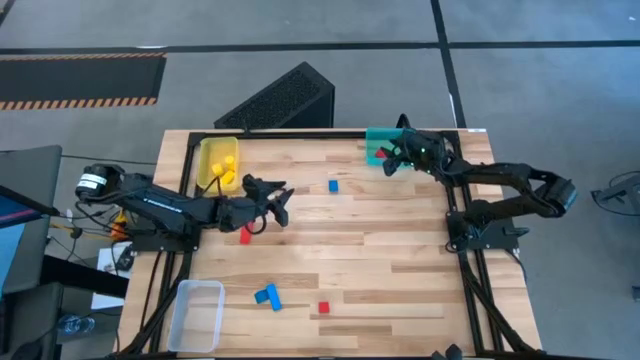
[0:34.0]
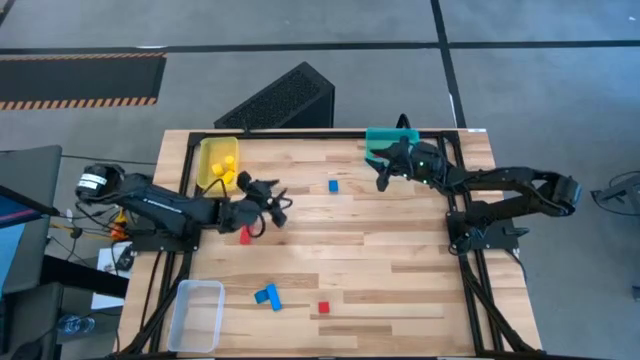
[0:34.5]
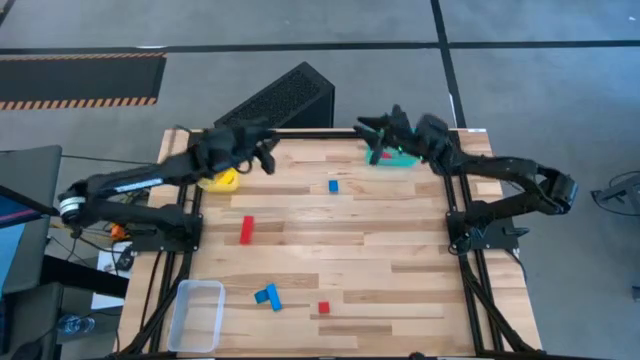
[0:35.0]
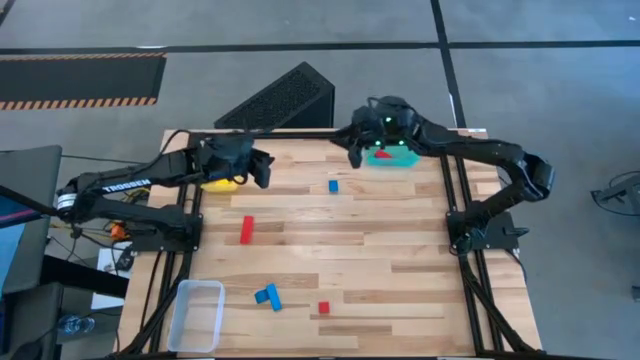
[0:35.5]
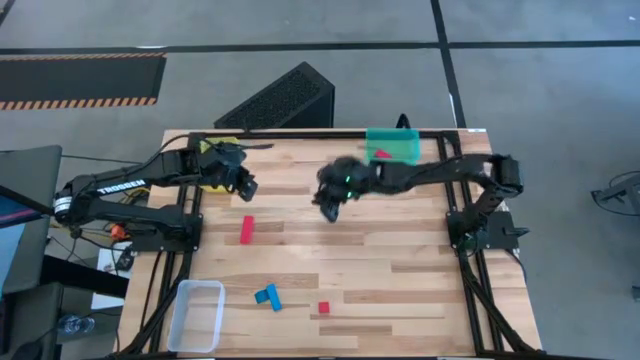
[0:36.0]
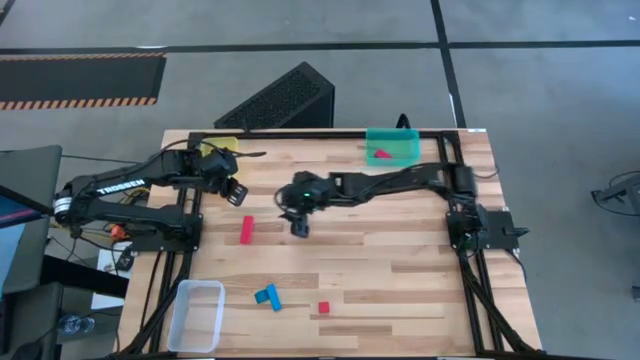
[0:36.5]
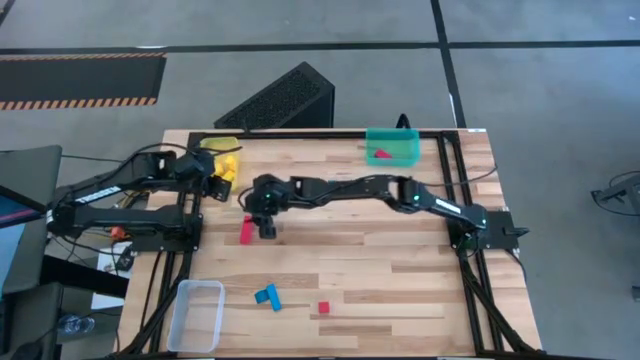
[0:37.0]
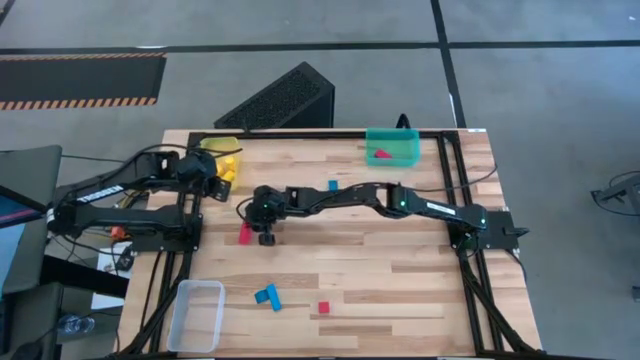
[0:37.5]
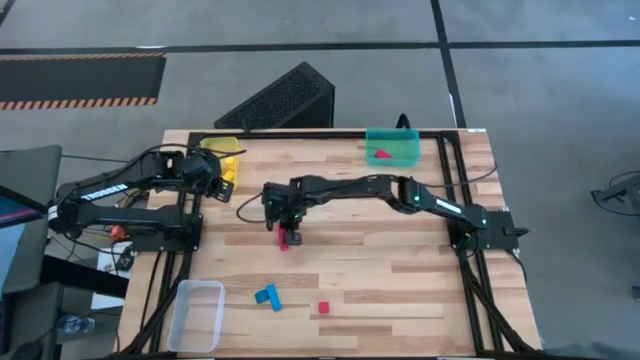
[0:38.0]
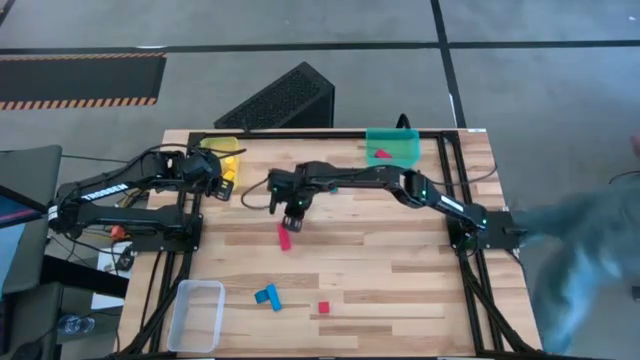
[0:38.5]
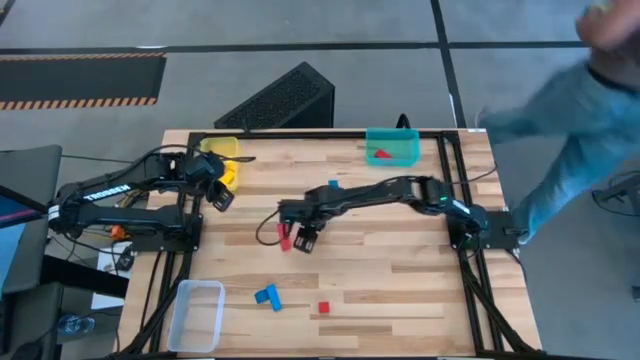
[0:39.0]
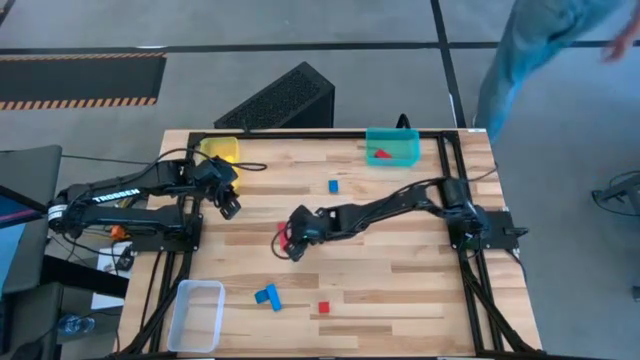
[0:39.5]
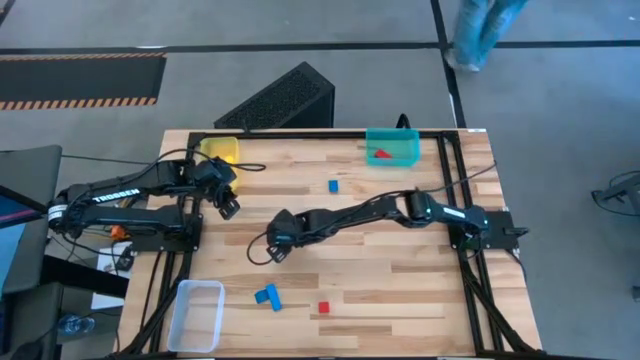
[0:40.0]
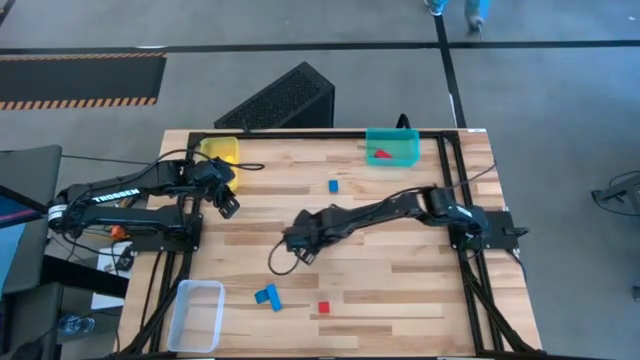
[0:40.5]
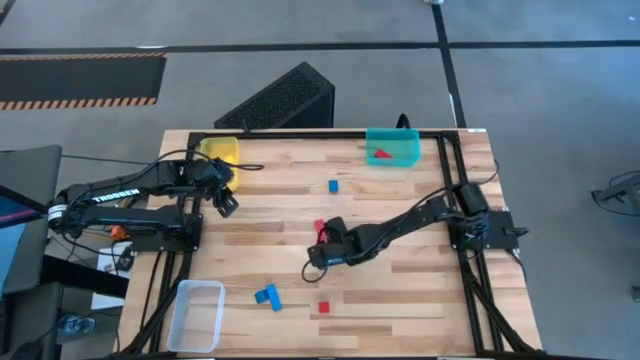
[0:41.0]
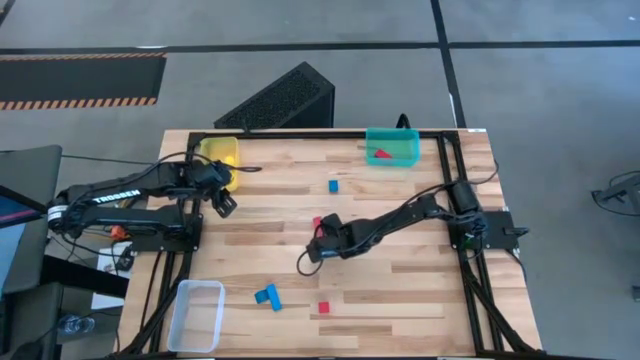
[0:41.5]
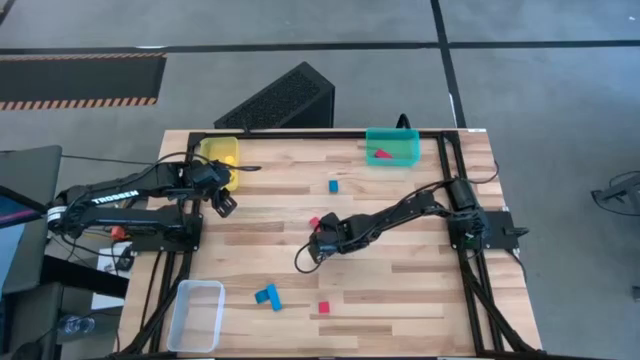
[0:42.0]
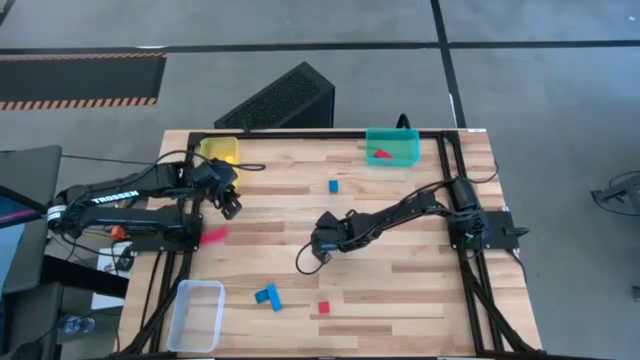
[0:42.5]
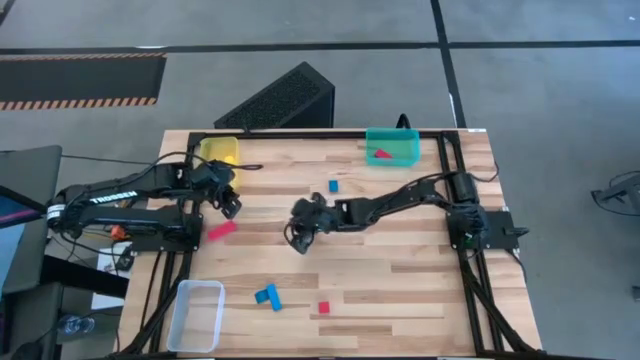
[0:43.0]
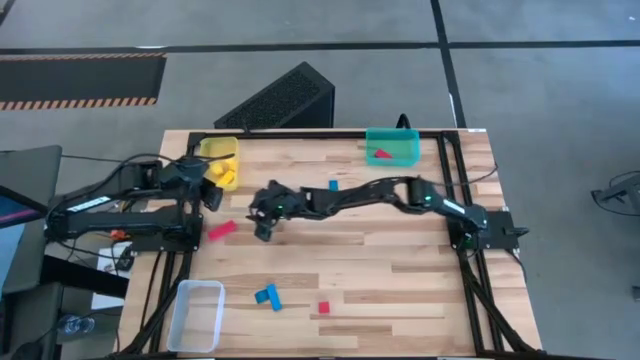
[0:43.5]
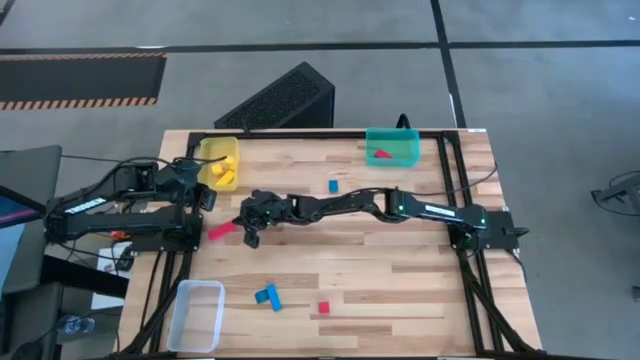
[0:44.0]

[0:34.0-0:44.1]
Task: Sort & place blocks by color
Put the top red block into the blue bin

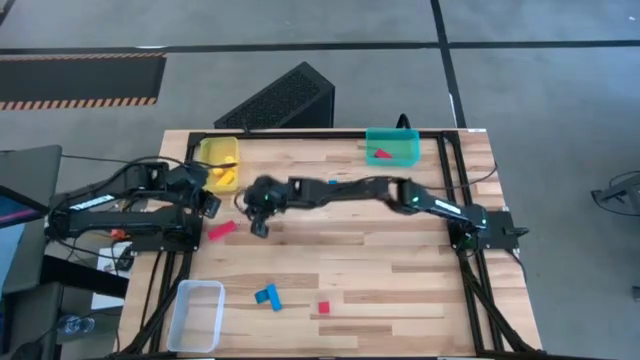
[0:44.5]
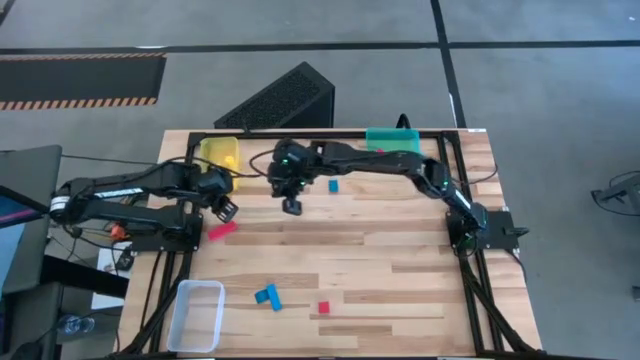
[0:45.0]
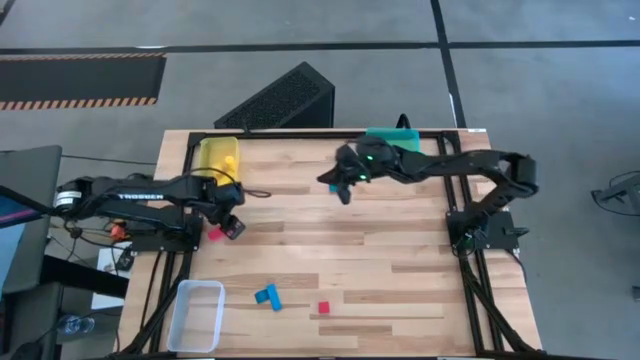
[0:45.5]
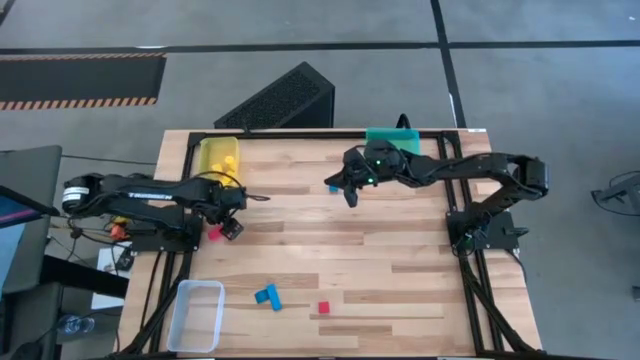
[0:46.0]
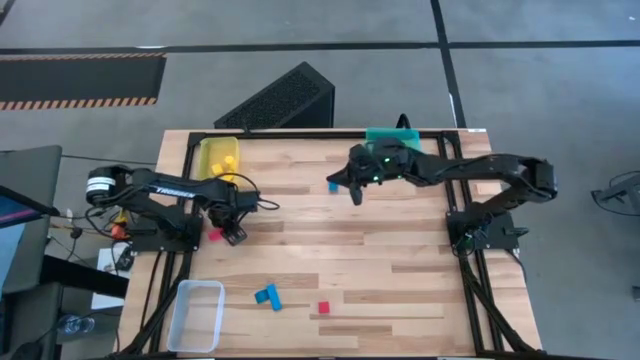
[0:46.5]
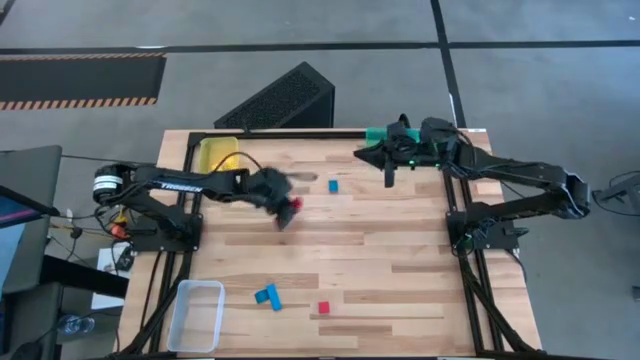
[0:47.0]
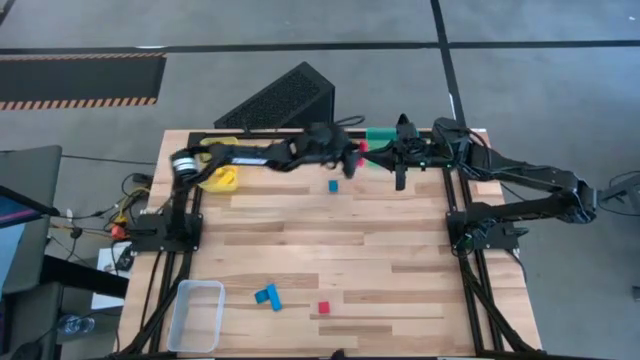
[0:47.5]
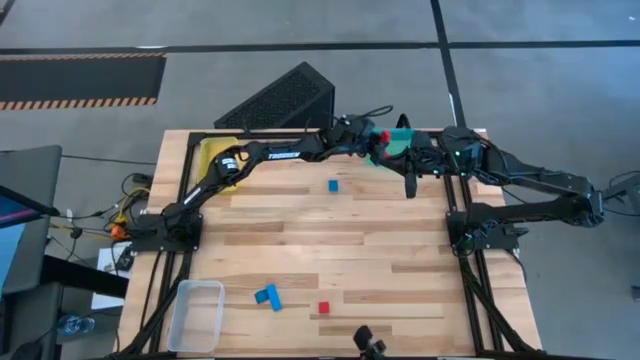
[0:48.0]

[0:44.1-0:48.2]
Put the top red block into the blue bin

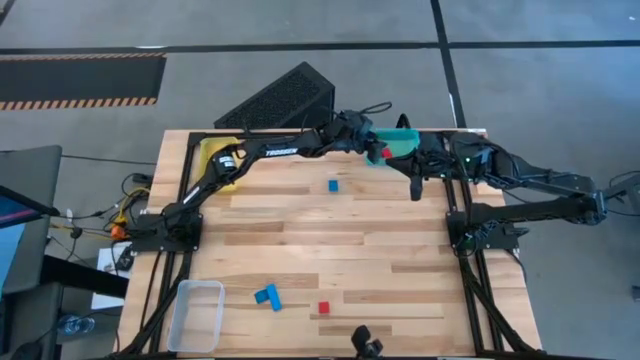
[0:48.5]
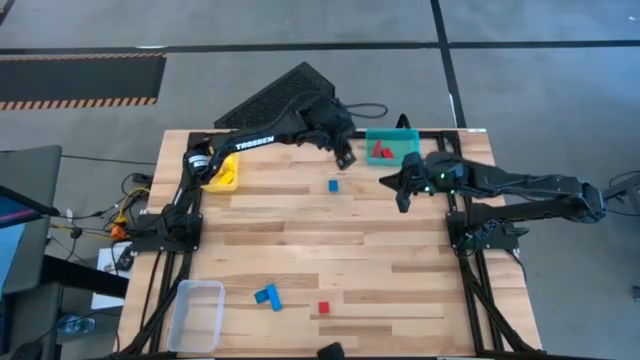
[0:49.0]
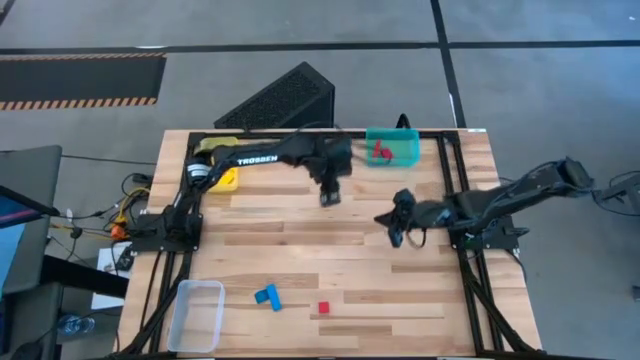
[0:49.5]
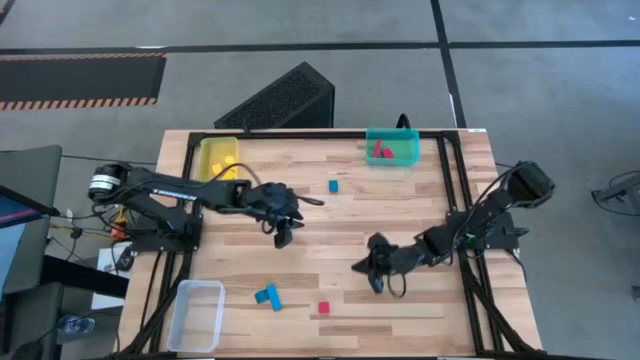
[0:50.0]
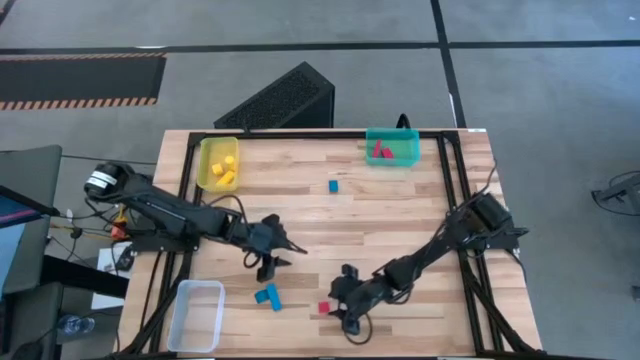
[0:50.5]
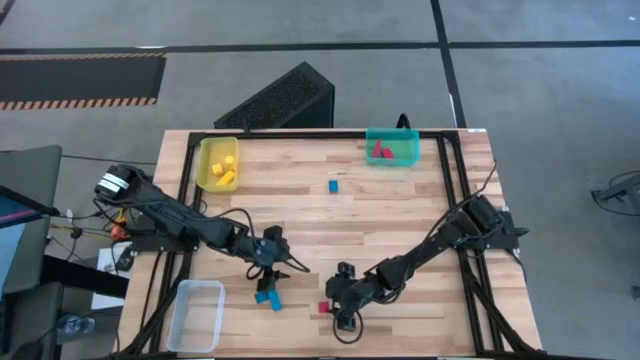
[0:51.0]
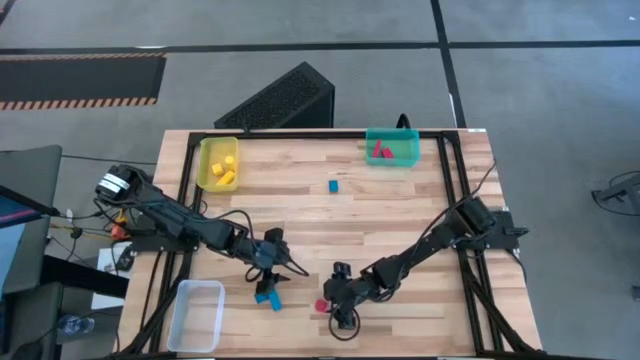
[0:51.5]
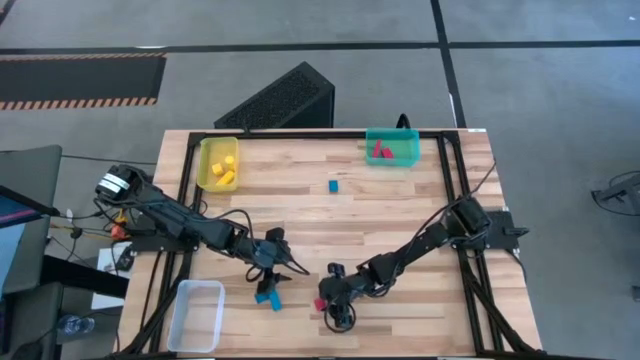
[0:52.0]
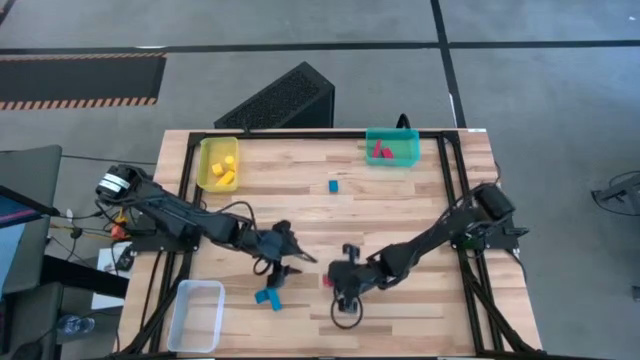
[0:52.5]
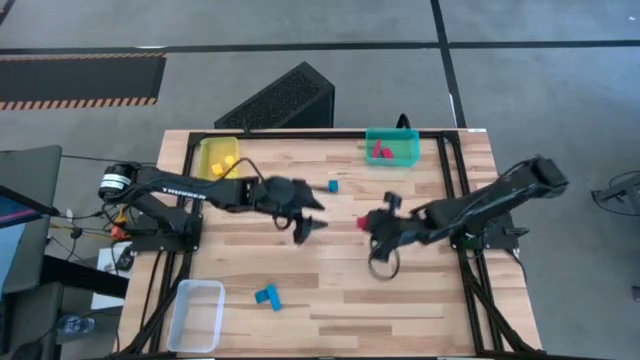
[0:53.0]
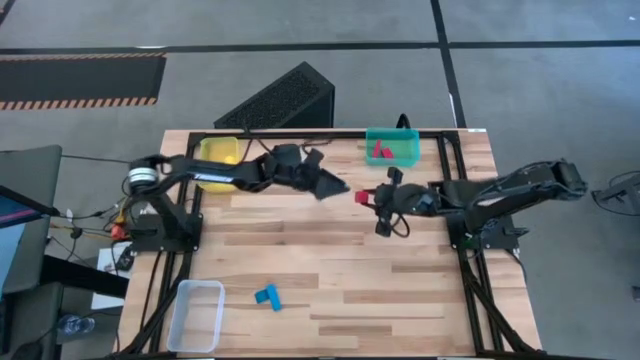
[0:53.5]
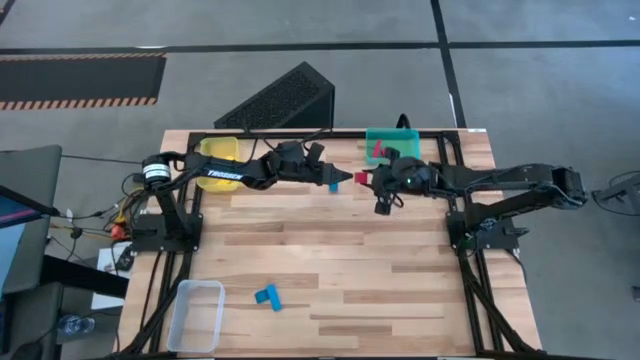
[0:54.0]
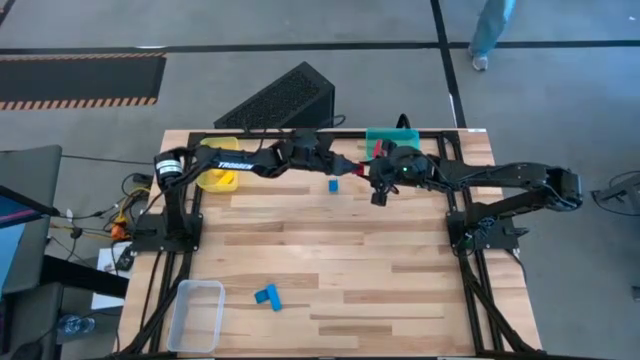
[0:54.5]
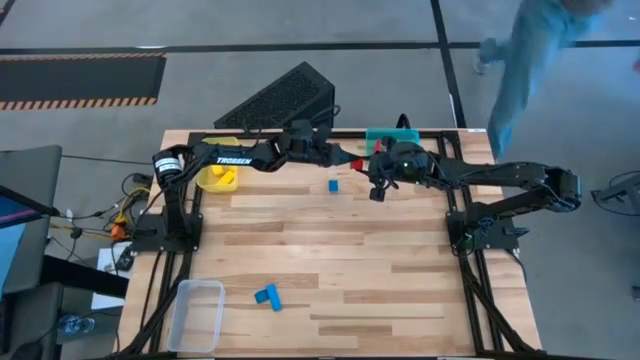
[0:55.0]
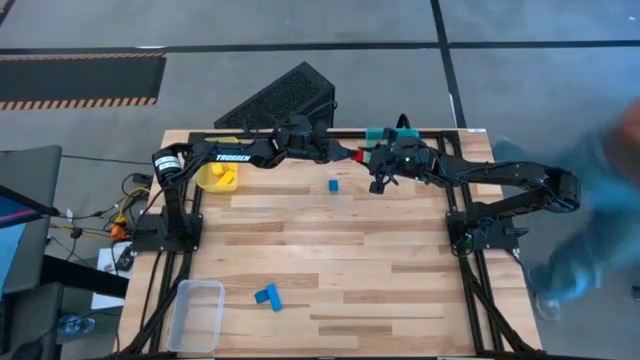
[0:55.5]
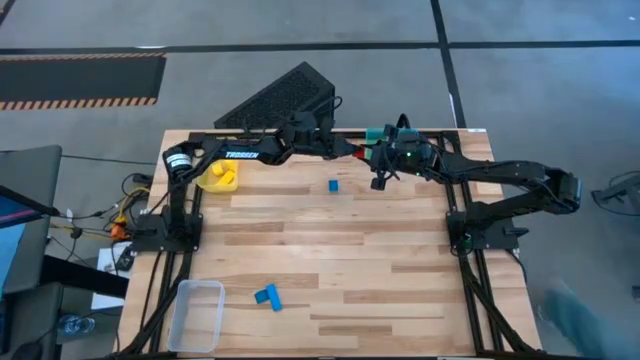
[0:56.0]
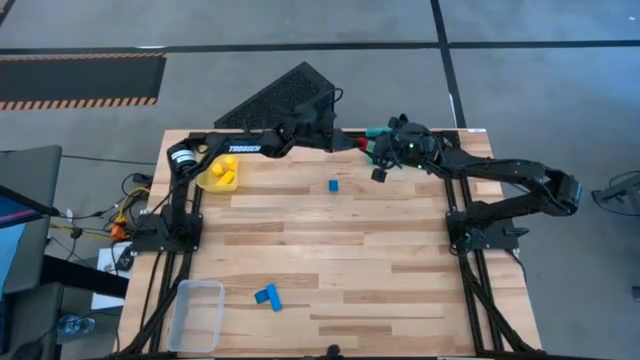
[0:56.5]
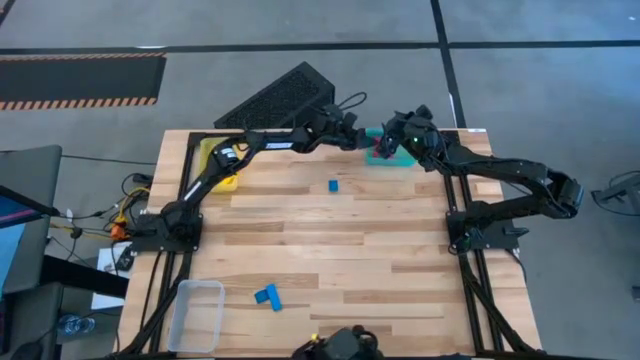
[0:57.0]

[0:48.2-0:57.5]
Put the red block into the blue bin
